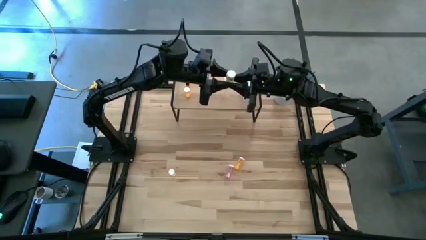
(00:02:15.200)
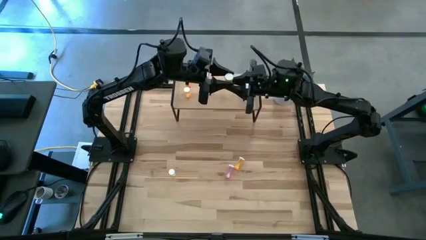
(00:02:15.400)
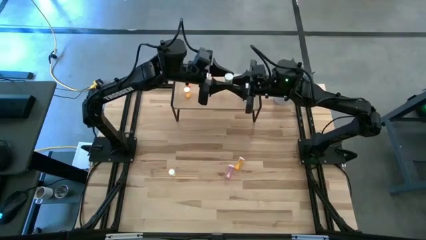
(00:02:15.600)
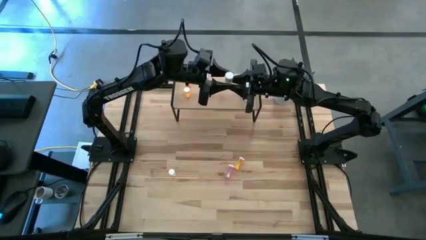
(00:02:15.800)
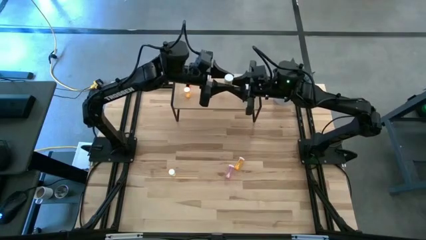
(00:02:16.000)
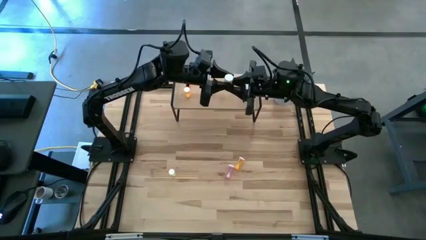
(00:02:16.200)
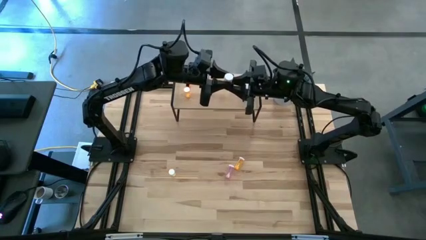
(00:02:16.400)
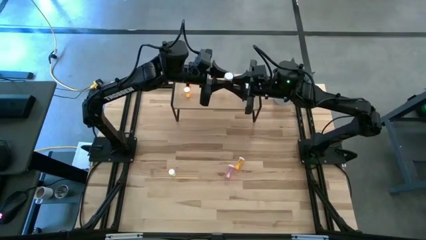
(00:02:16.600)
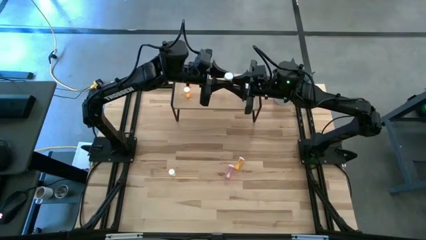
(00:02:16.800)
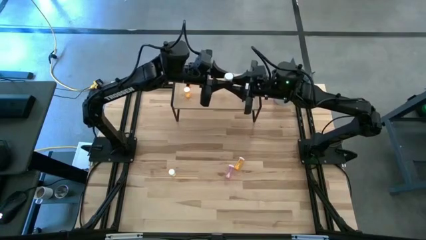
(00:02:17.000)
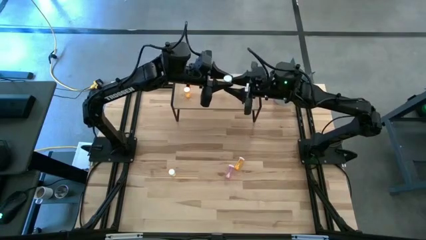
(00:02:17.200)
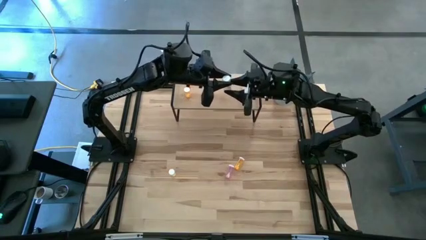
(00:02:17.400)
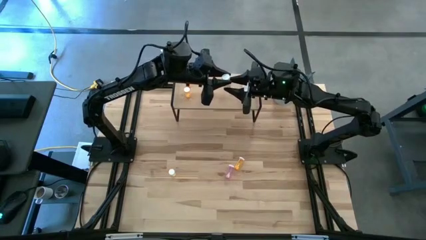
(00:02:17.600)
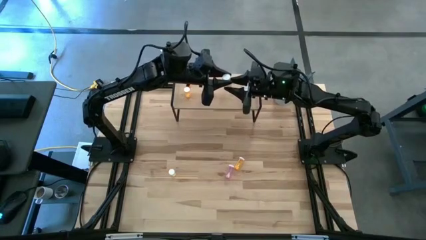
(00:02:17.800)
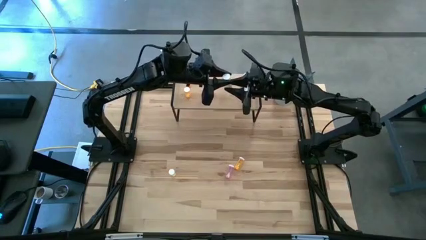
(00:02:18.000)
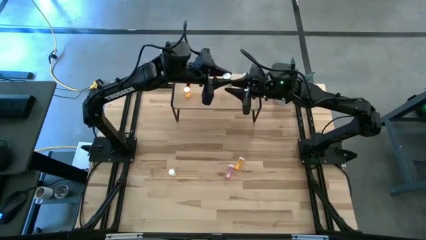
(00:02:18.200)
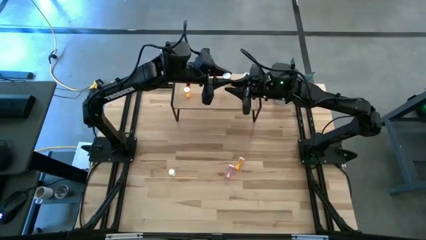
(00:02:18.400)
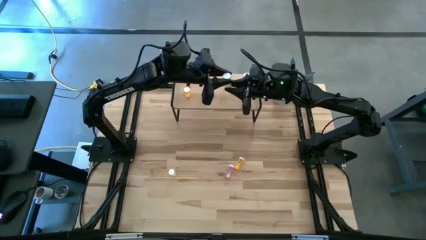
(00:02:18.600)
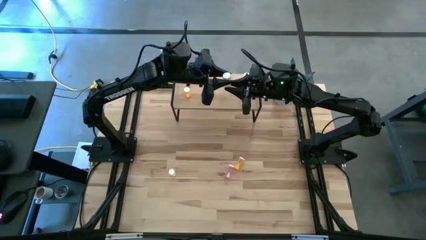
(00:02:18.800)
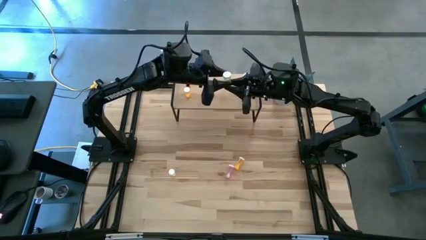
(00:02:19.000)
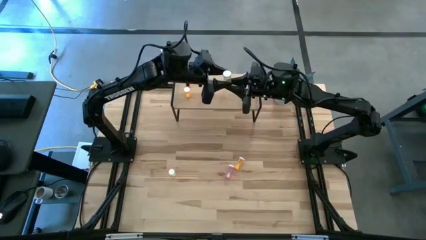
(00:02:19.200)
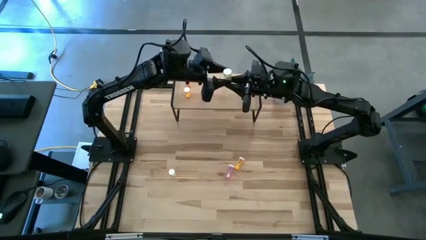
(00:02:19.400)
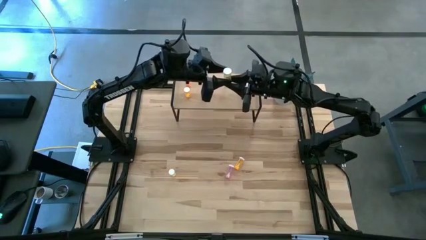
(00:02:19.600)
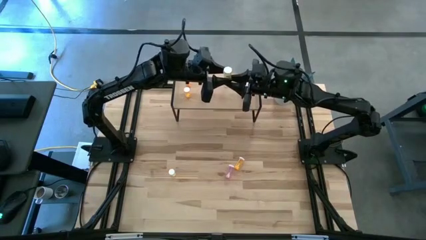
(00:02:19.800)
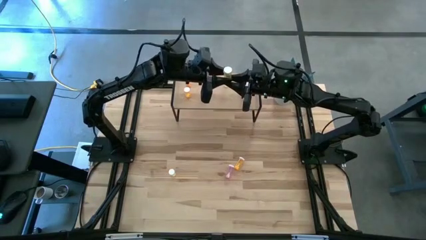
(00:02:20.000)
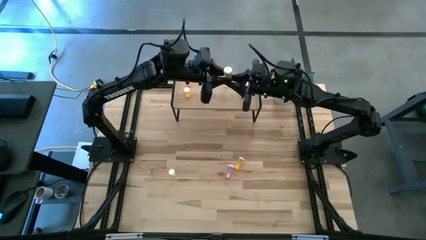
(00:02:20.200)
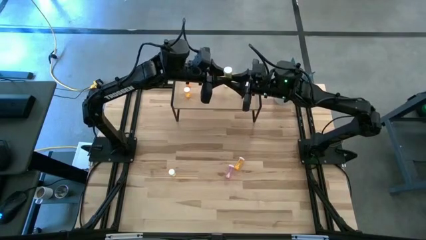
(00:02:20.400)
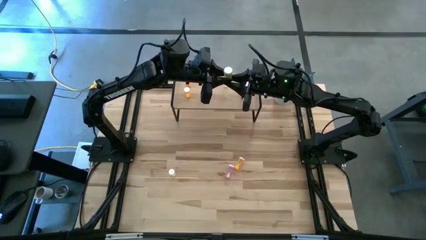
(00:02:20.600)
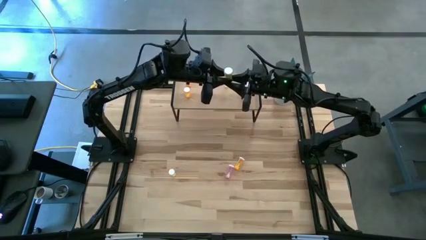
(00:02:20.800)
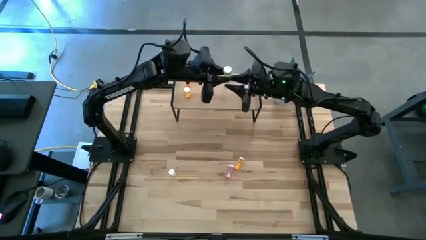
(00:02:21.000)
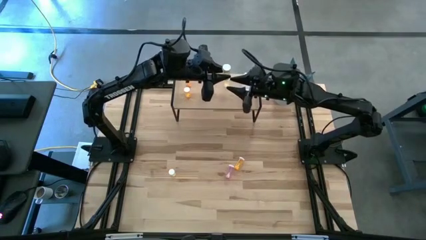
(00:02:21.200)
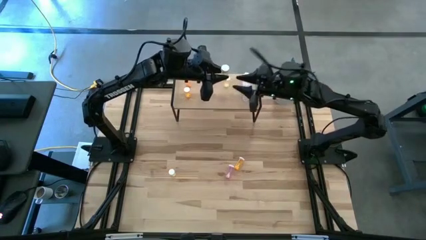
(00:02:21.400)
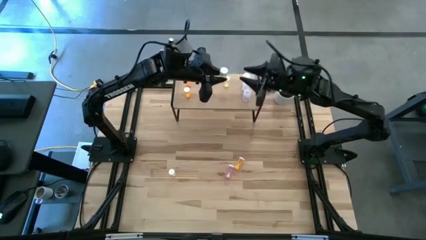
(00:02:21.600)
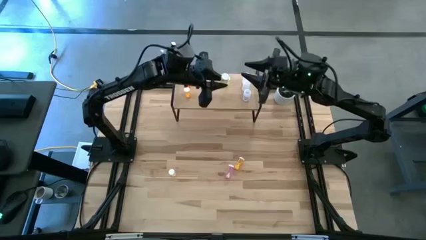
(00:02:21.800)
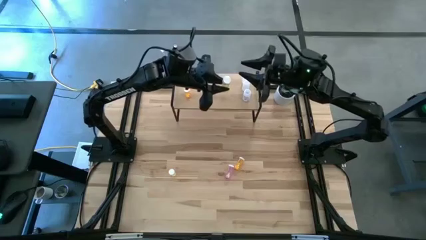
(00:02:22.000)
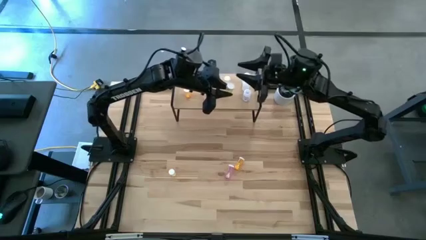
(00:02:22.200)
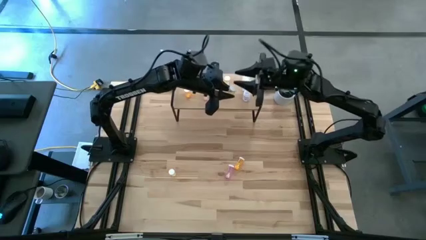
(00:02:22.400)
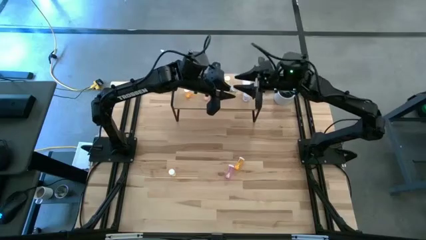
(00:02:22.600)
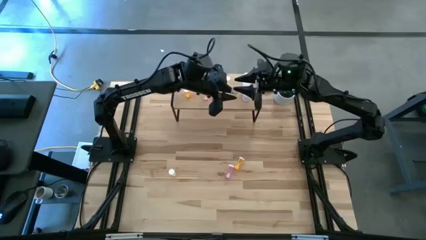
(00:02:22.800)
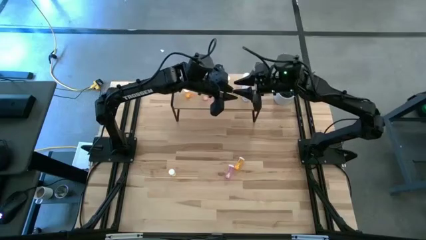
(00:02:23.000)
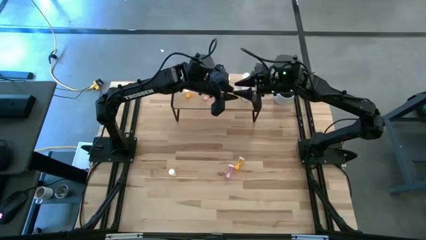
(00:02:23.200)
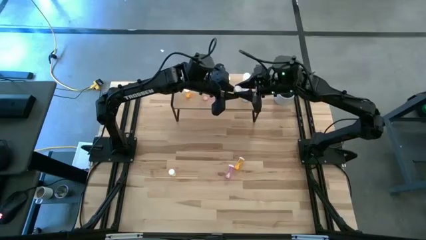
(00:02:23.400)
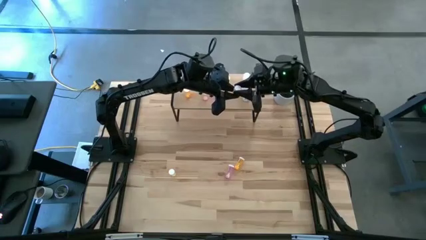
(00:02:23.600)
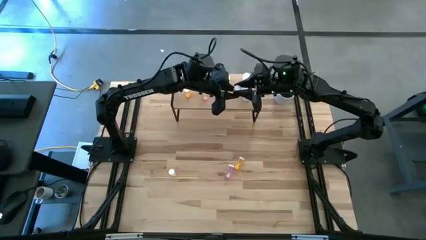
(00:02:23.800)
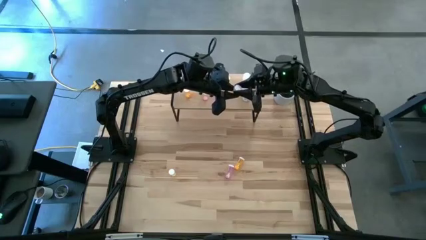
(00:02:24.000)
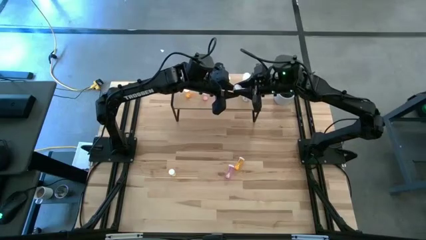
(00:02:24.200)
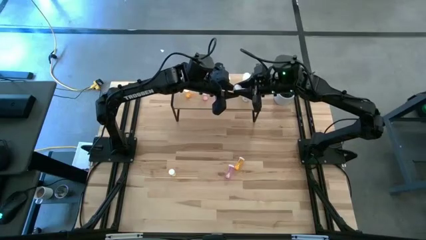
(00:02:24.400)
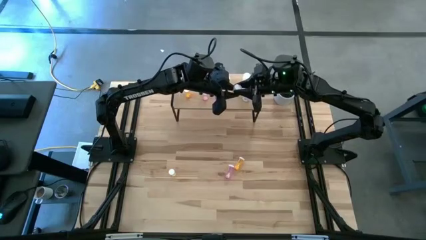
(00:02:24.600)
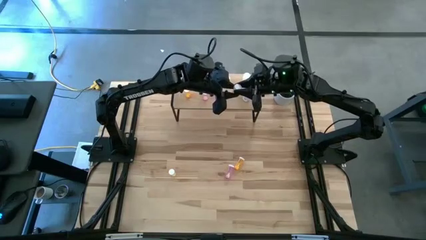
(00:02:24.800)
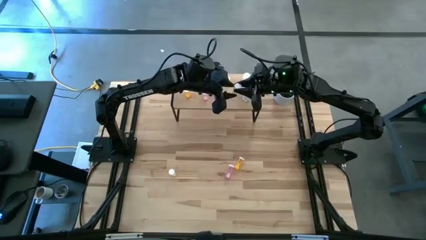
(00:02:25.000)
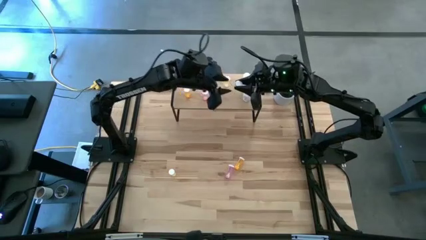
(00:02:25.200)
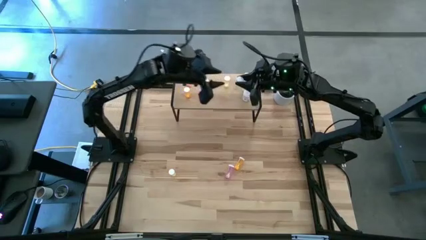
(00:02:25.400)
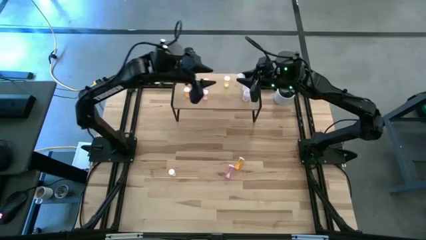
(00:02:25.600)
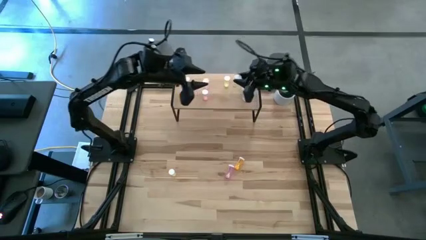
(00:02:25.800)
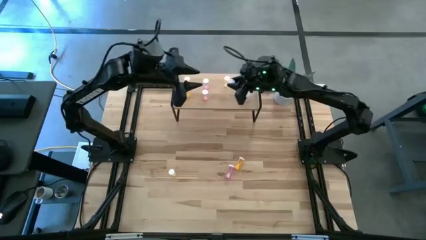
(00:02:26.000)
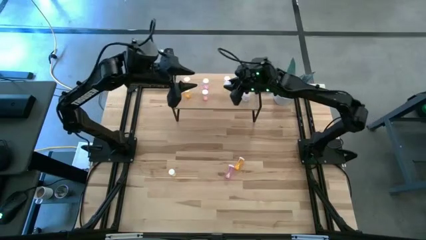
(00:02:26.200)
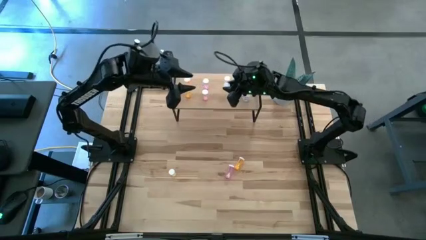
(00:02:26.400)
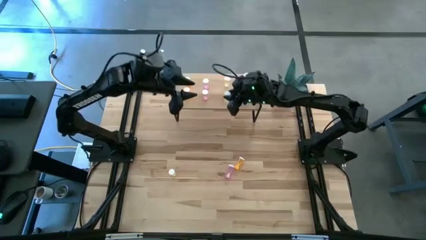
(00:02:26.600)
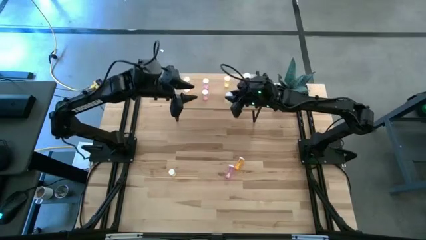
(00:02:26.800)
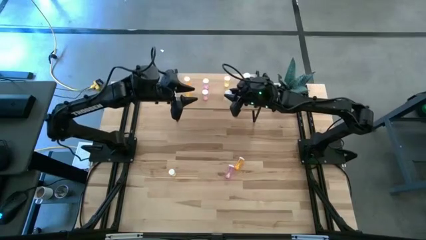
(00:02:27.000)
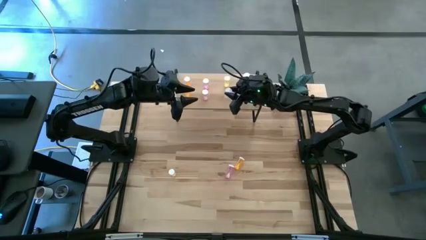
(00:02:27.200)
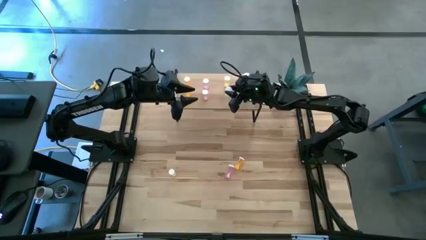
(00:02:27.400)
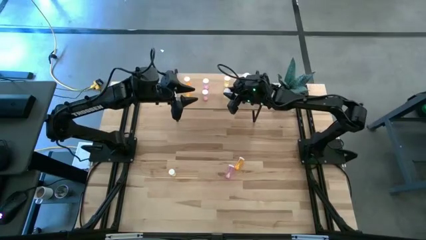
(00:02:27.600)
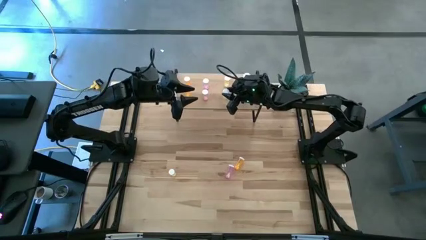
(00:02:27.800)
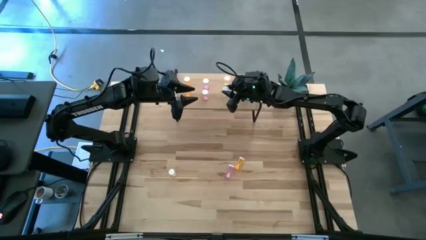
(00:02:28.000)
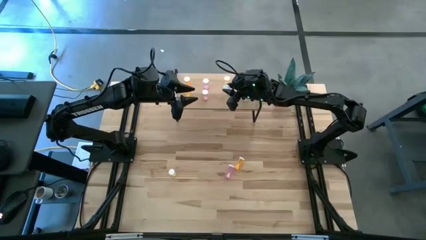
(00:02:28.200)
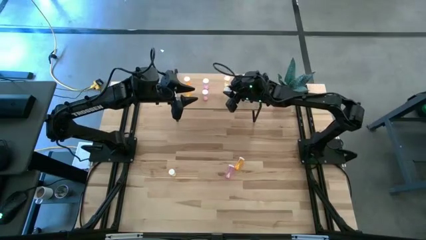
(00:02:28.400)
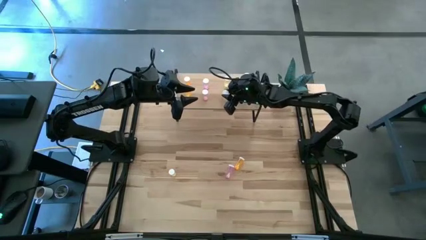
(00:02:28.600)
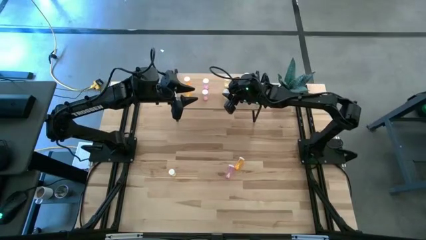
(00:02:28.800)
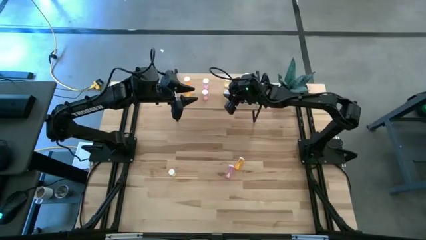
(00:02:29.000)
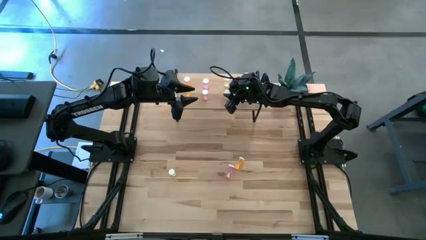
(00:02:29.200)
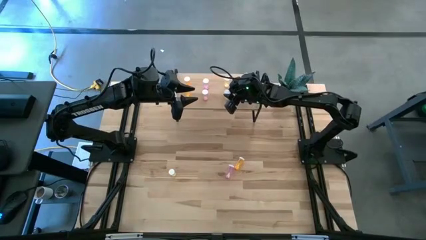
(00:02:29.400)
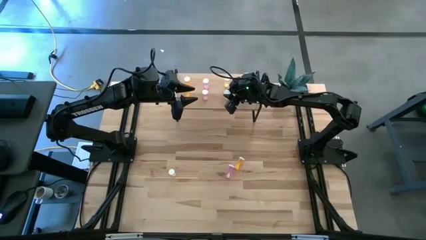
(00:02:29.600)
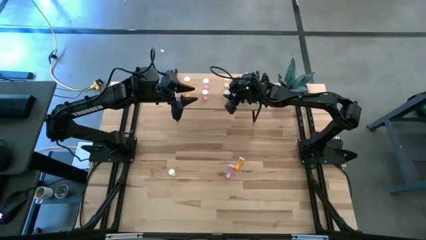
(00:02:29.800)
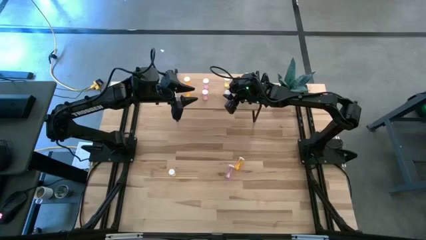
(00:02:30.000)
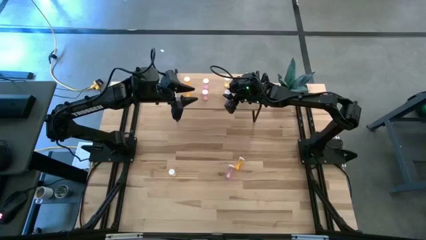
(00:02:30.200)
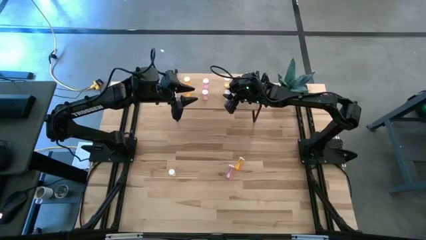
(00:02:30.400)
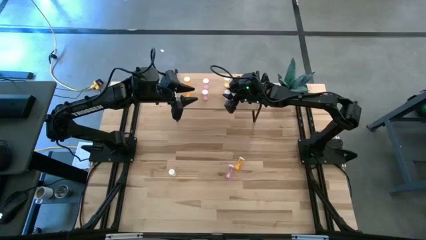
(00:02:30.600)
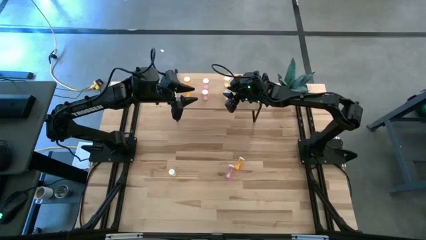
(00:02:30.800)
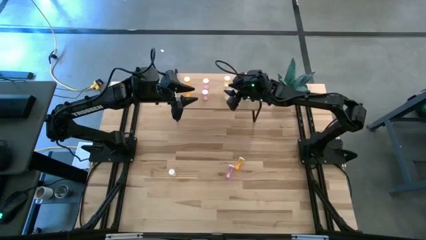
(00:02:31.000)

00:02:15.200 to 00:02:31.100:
Task: Pick and place medicine bottles onto shelf by color
Put the right yellow pill bottle on the shelf aligned with the other yellow pill bottle
